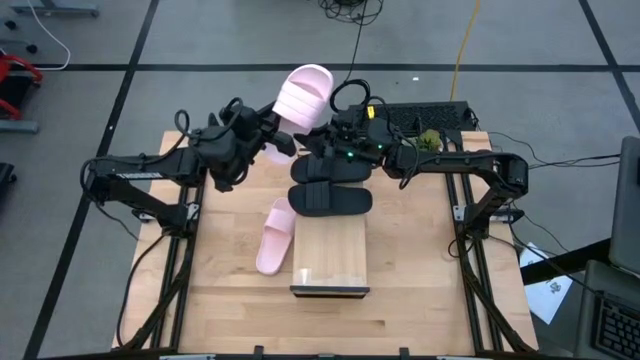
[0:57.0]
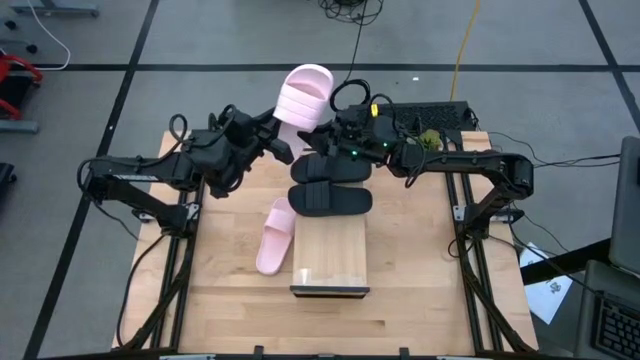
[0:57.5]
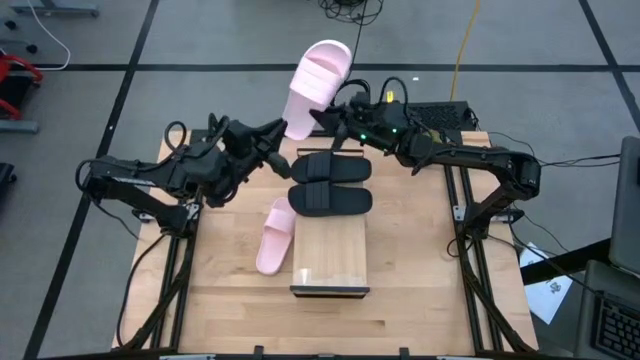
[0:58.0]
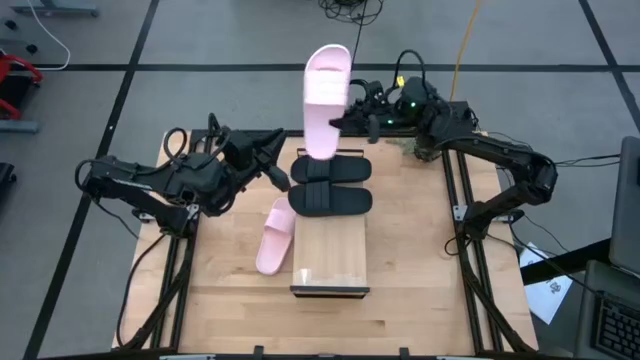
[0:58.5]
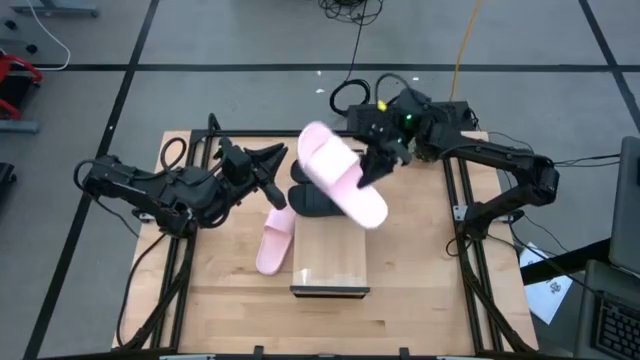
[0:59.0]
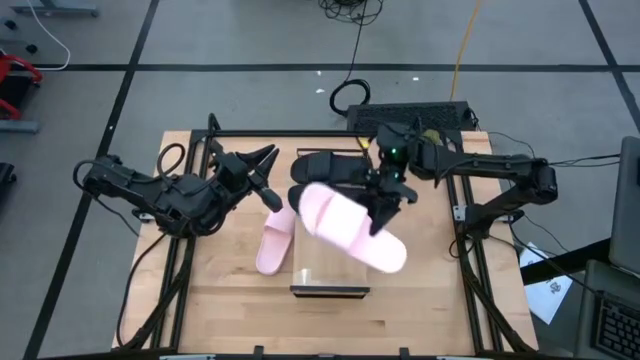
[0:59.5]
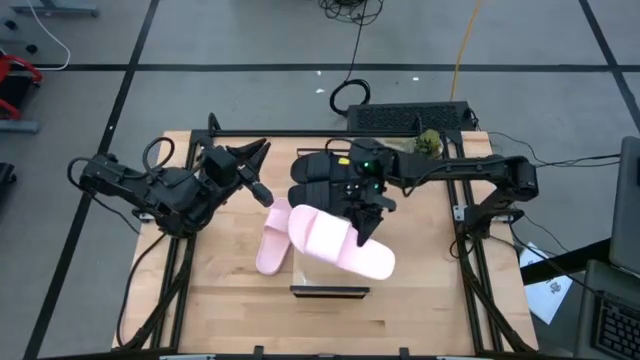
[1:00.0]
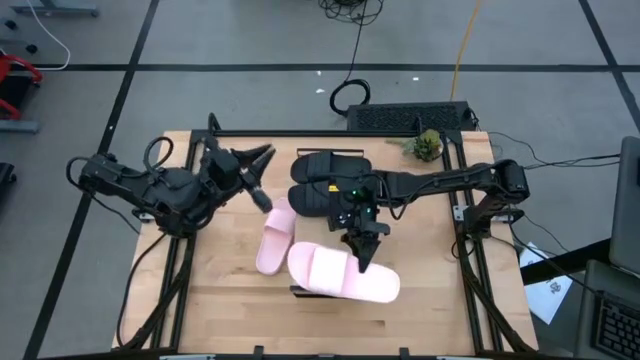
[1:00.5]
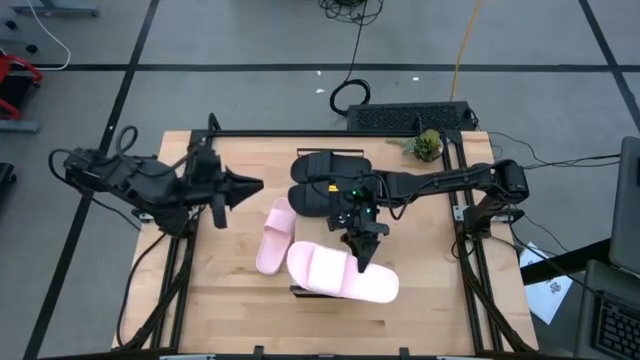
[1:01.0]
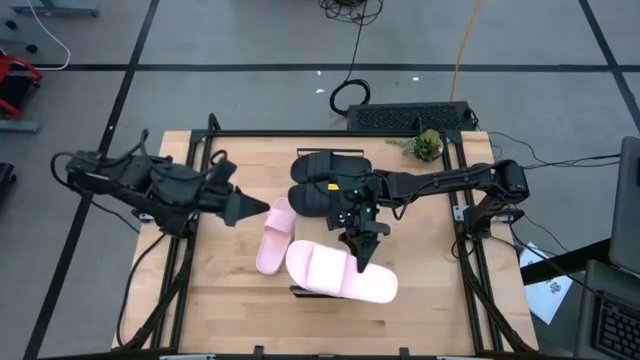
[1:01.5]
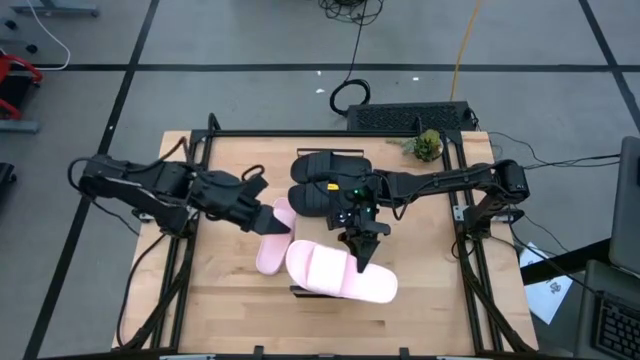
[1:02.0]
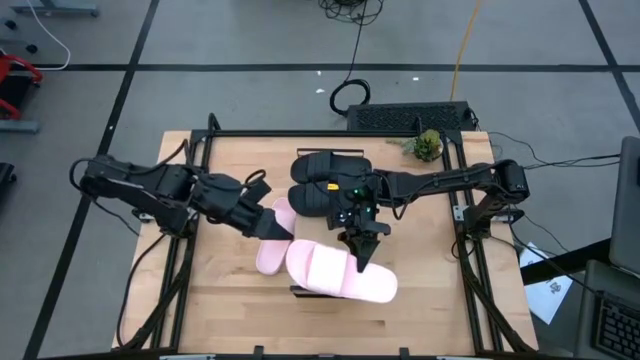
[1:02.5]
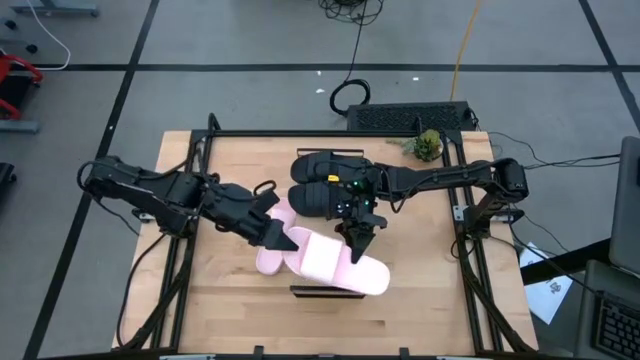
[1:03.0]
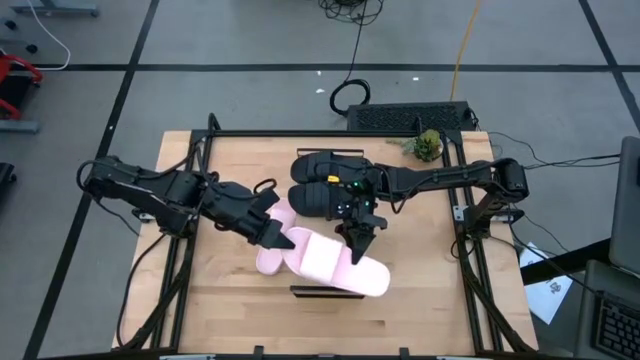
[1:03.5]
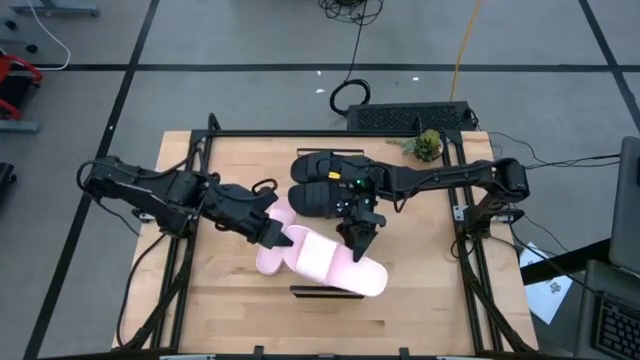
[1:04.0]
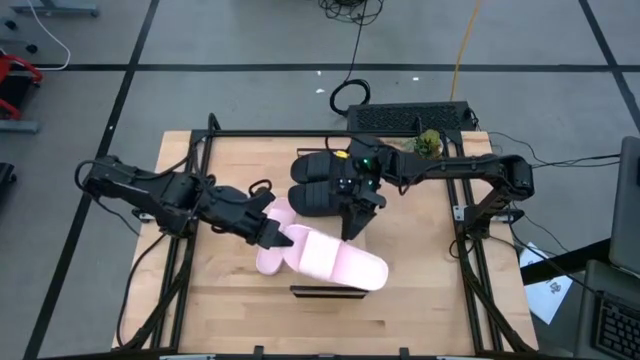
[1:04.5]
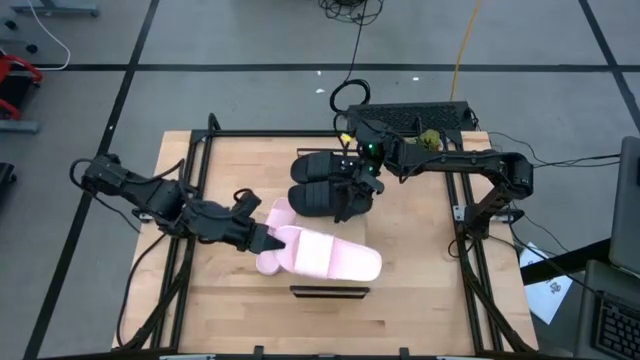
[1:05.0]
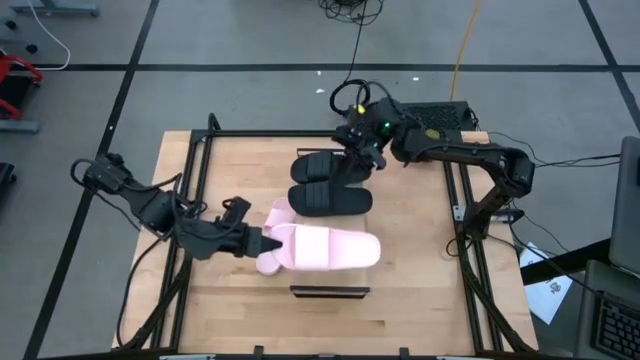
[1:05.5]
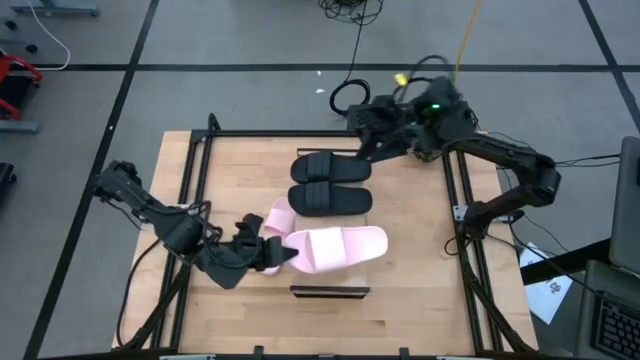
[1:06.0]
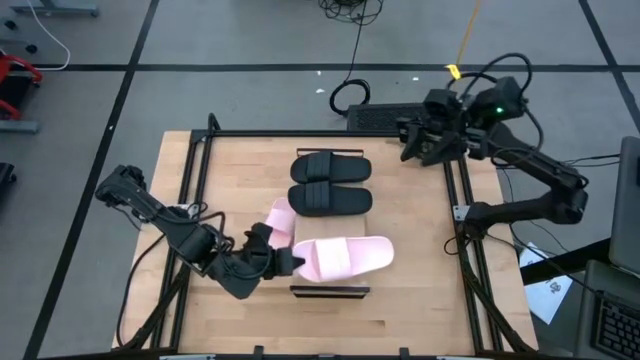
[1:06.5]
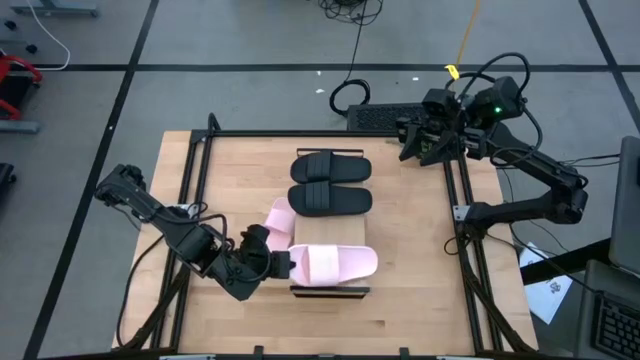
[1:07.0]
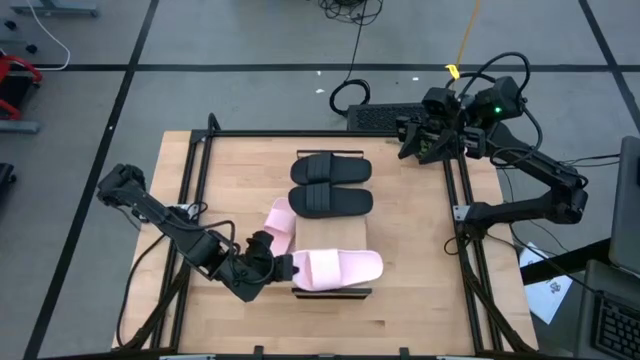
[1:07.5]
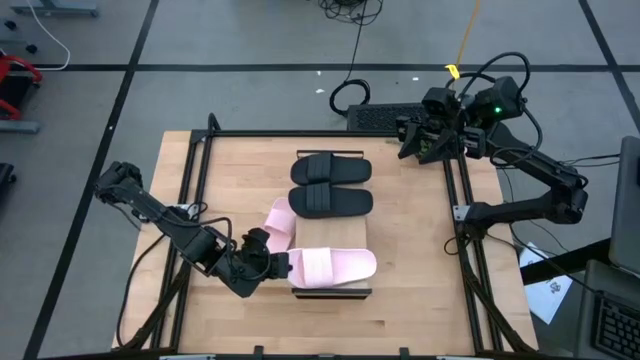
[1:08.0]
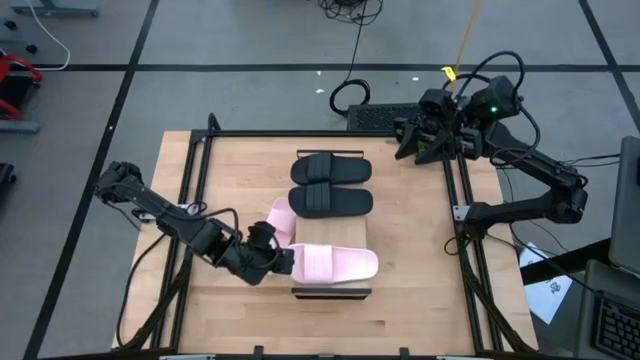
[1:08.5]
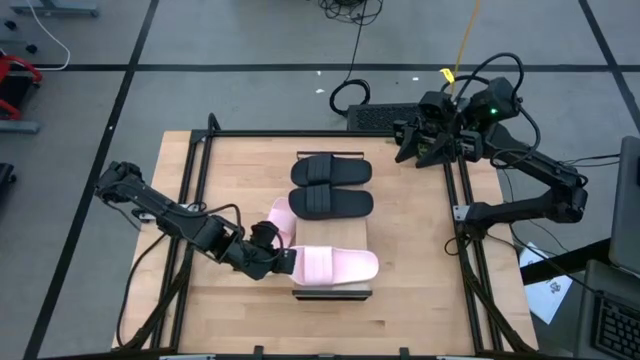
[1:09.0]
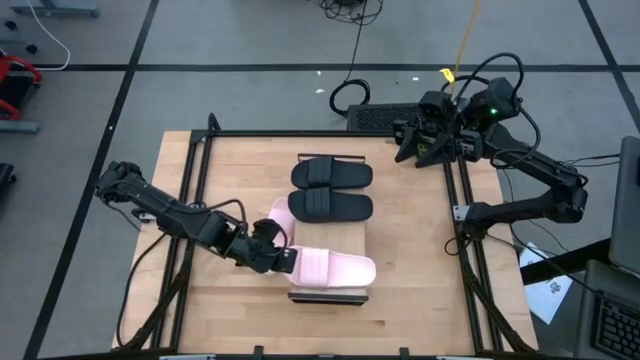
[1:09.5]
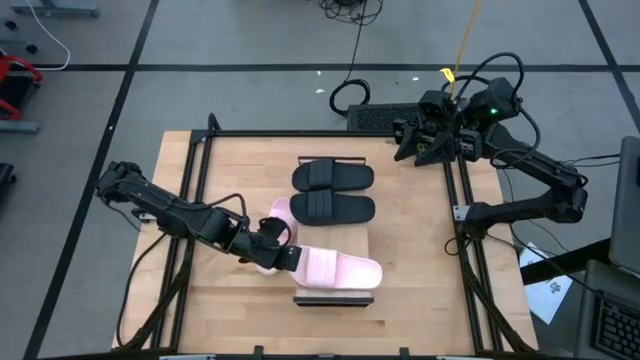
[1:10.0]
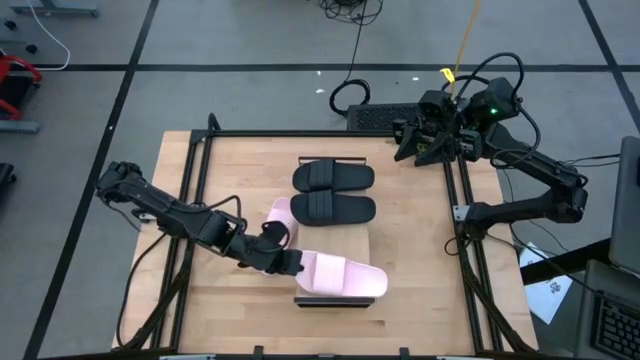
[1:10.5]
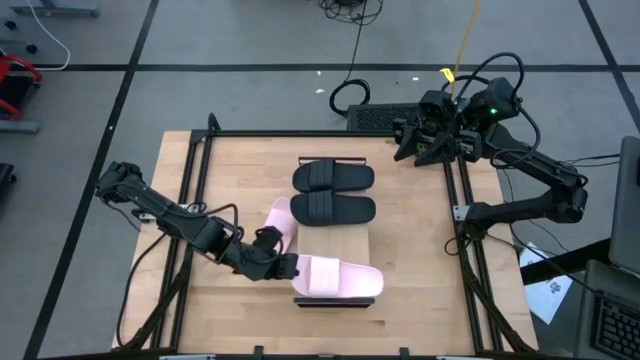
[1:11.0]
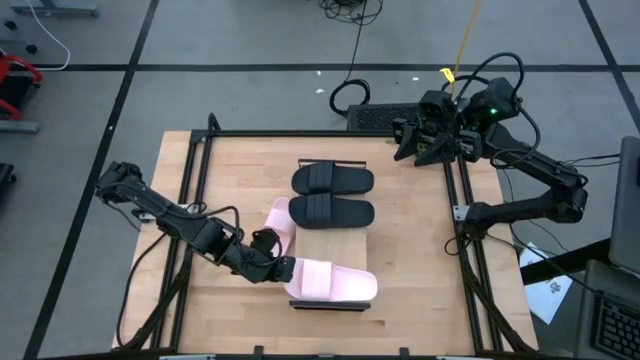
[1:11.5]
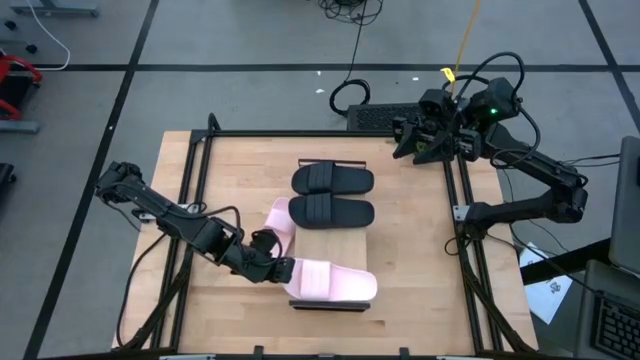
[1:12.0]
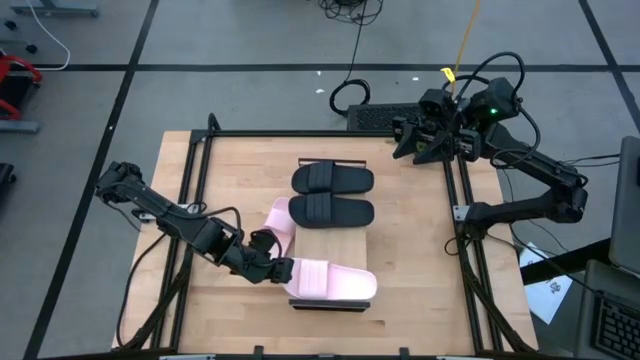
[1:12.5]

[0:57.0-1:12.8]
Task: Pick and place slides into the shelf
Put the left pink slide on the shelf

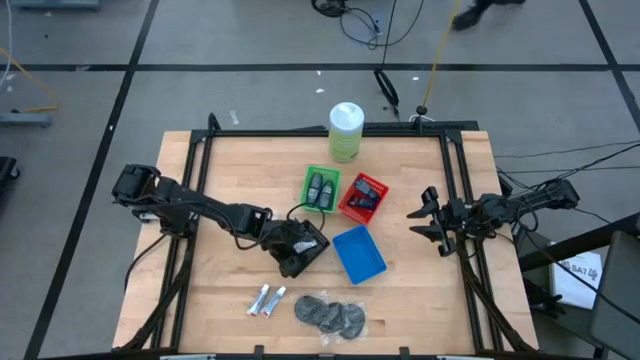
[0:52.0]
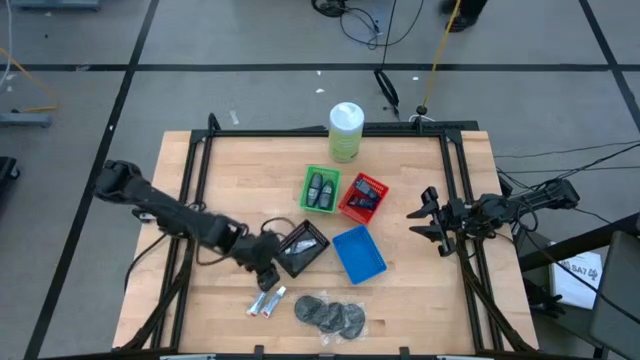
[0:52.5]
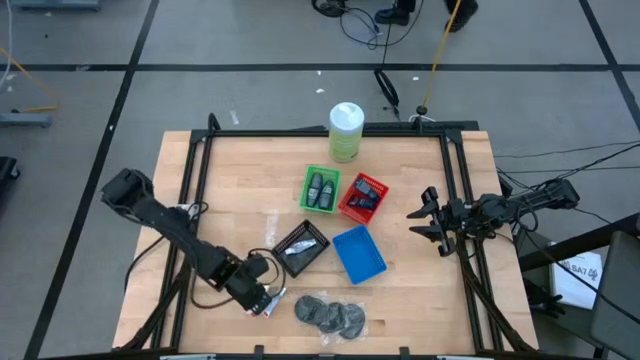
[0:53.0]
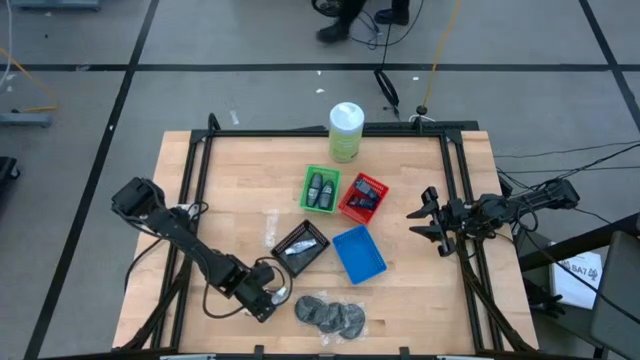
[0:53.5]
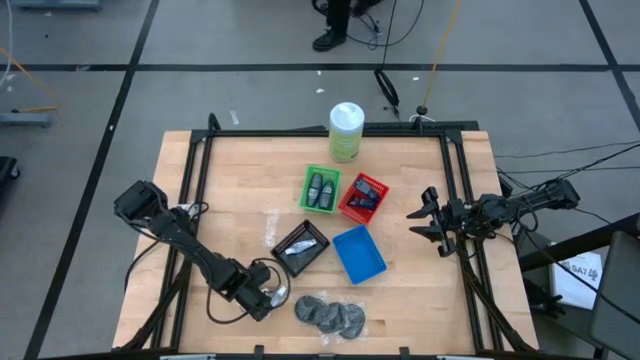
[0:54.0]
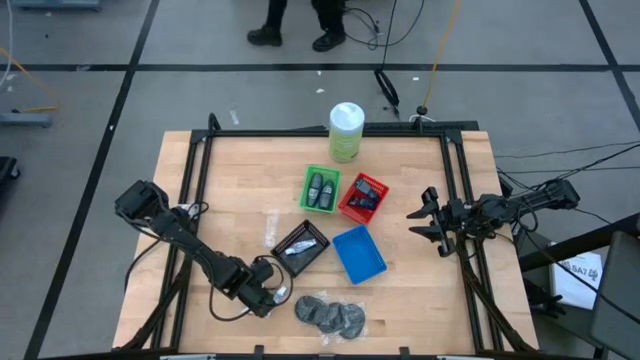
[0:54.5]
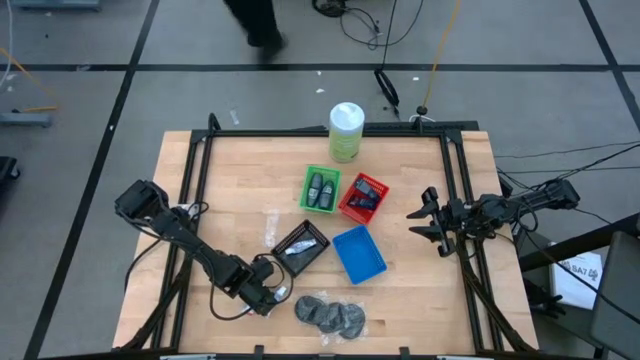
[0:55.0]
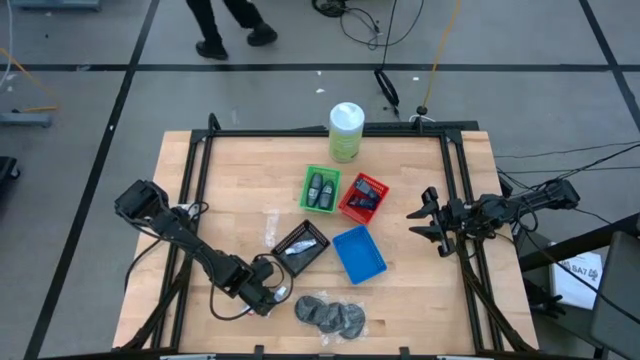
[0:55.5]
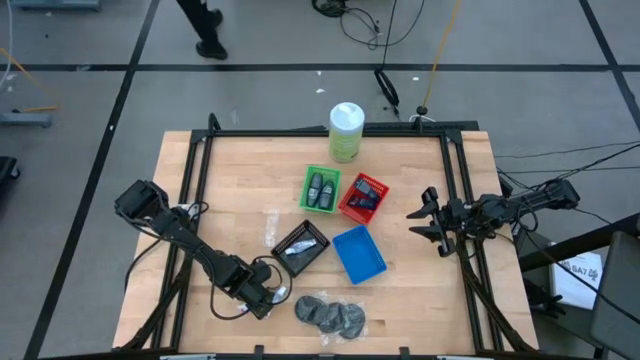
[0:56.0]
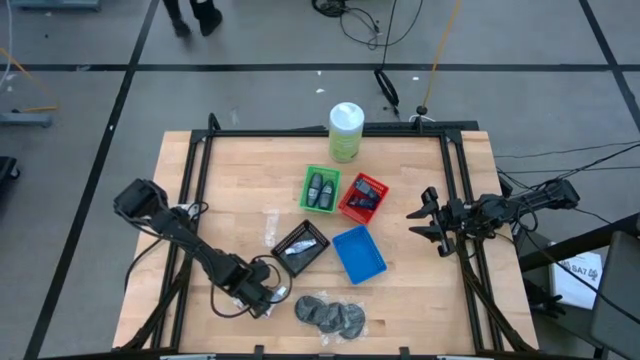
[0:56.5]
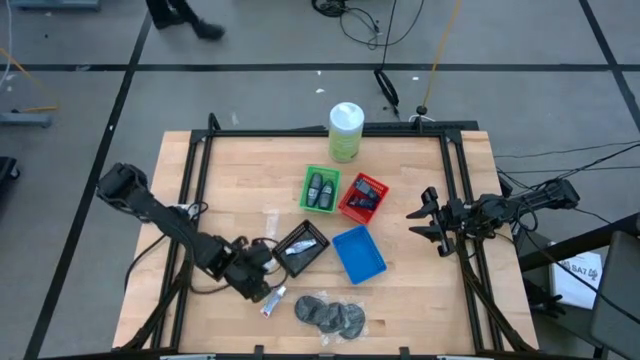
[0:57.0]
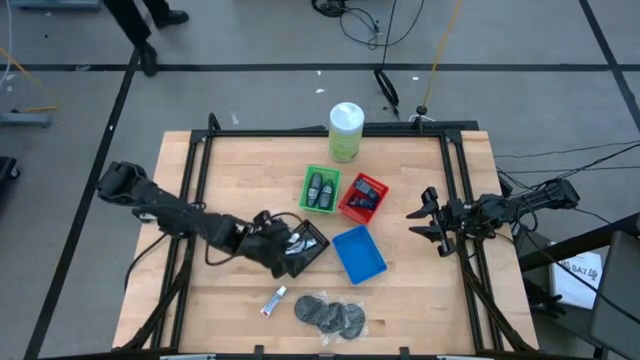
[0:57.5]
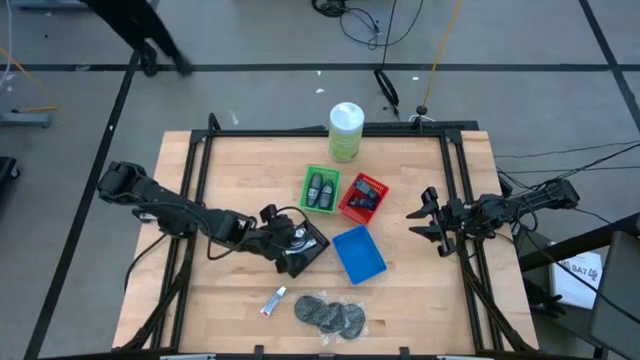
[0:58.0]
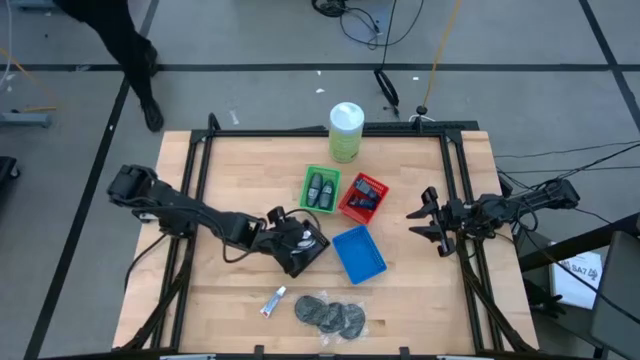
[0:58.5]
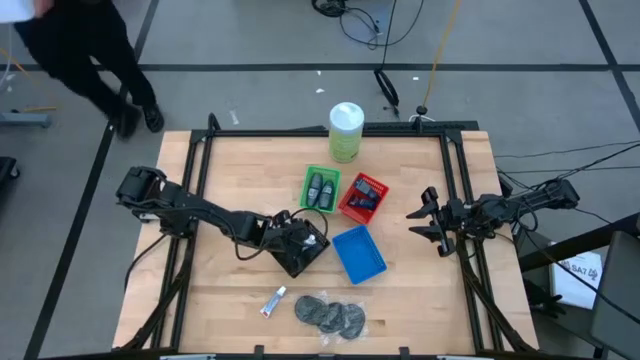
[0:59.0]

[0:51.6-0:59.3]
Task: Pick & Place Travel size toiletries
Put the left white toothpaste into the black bin
